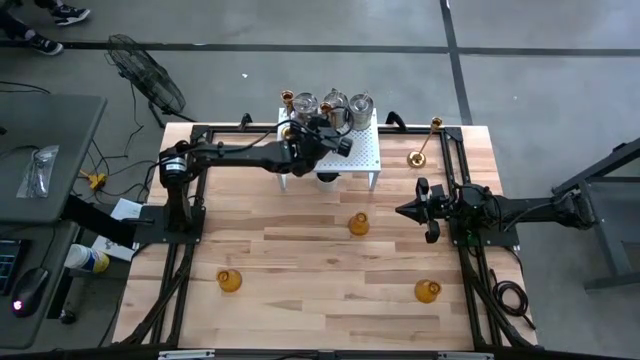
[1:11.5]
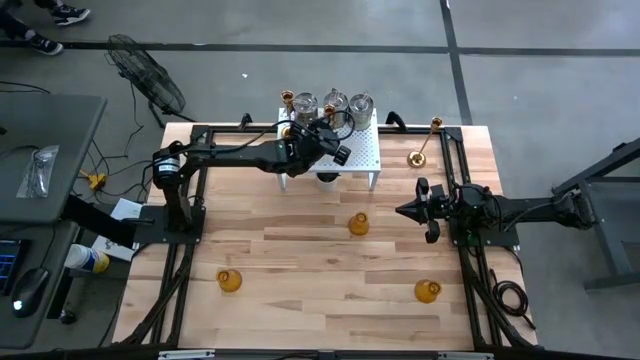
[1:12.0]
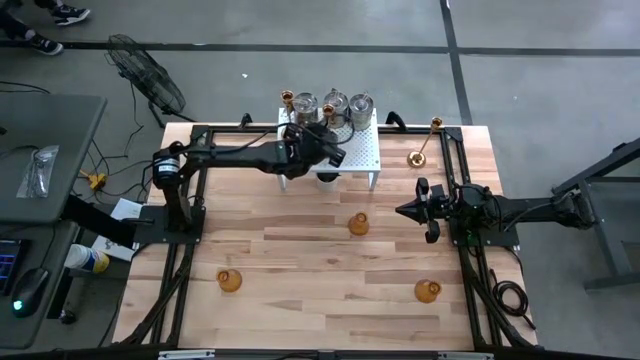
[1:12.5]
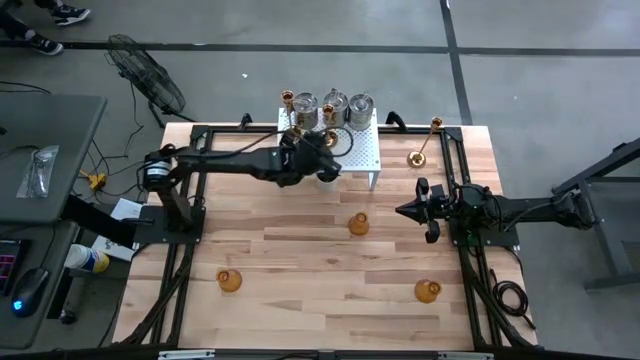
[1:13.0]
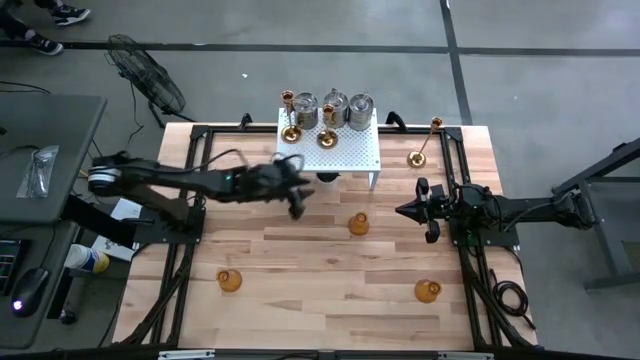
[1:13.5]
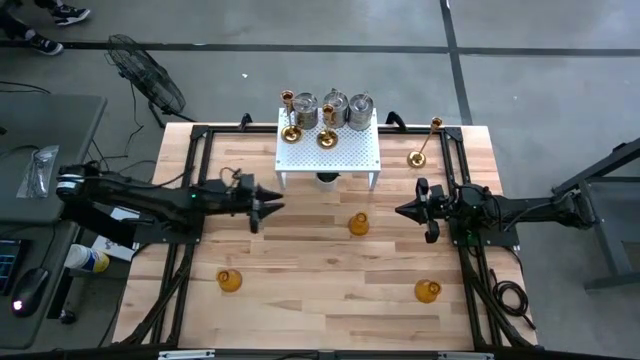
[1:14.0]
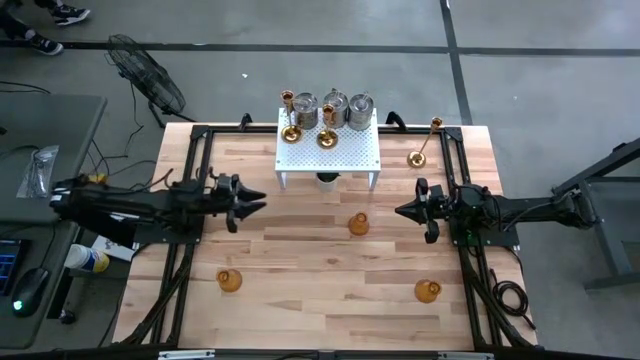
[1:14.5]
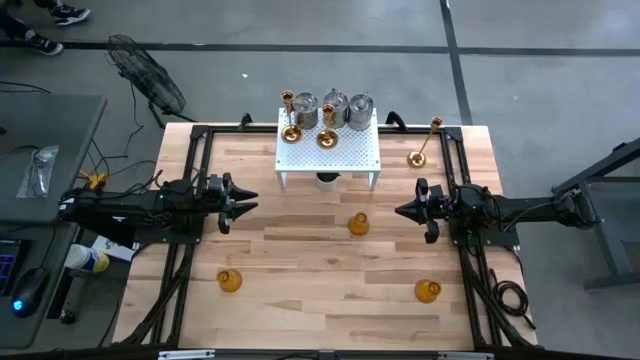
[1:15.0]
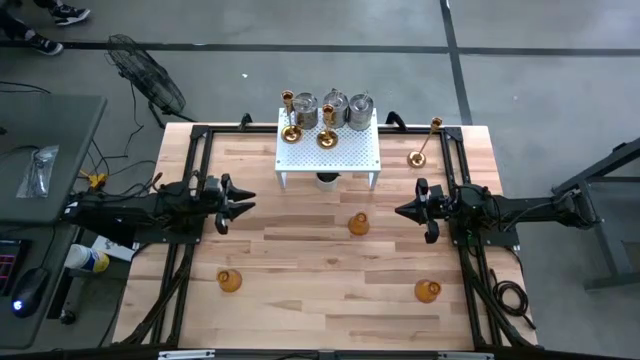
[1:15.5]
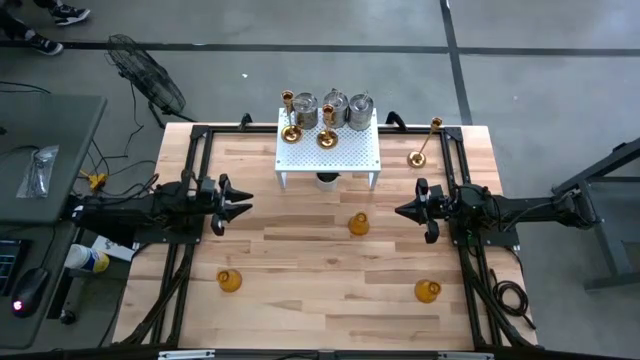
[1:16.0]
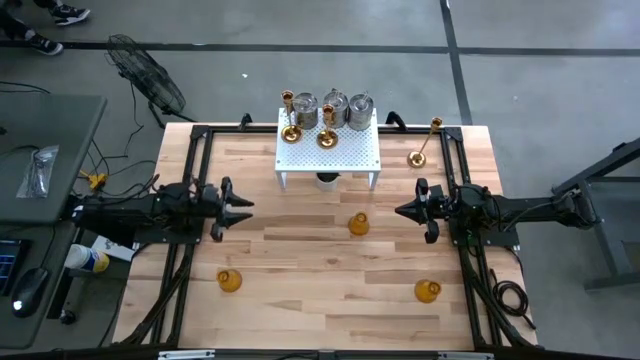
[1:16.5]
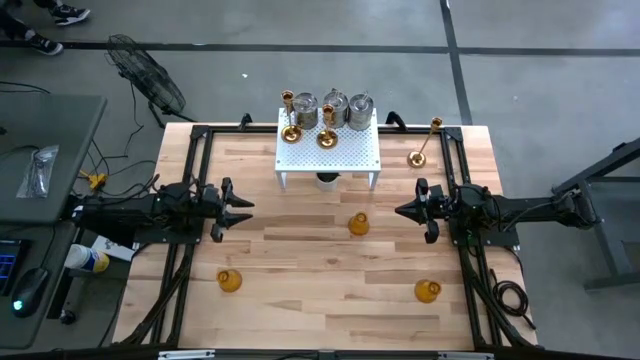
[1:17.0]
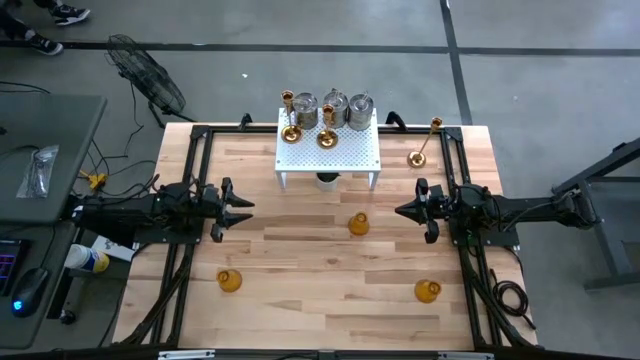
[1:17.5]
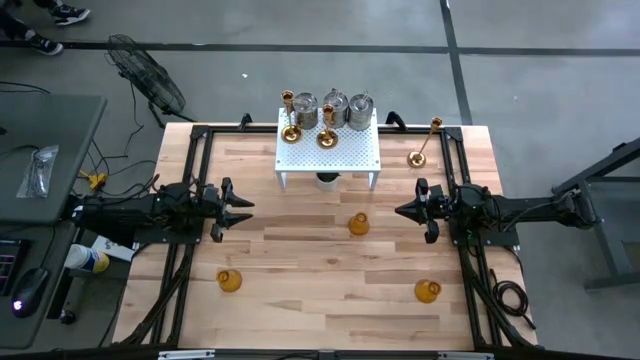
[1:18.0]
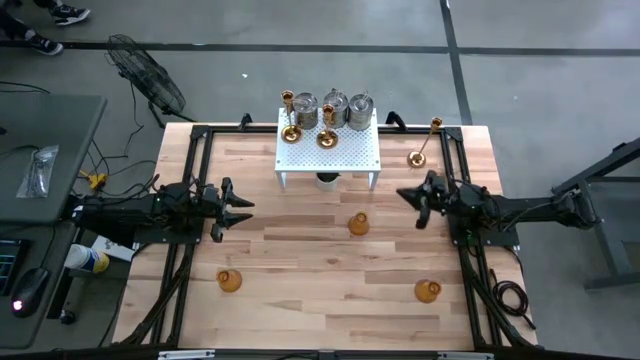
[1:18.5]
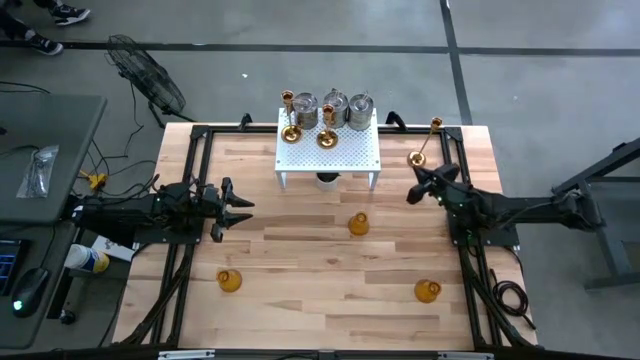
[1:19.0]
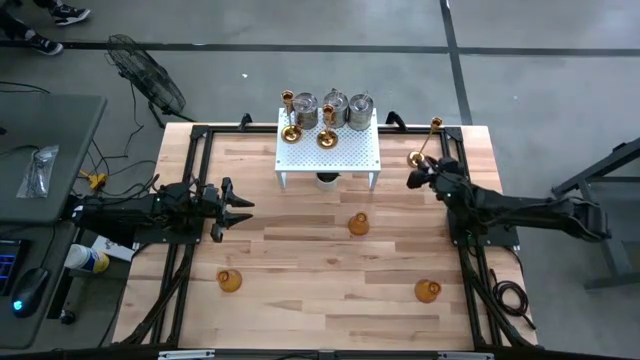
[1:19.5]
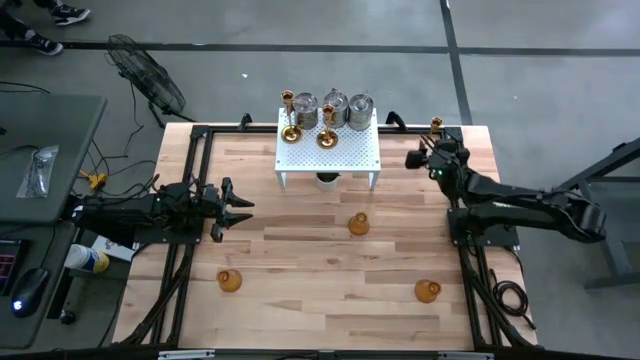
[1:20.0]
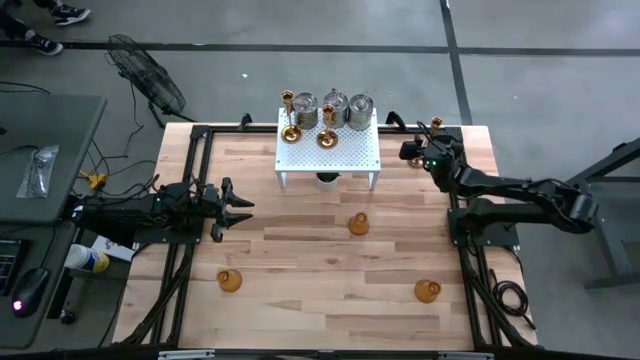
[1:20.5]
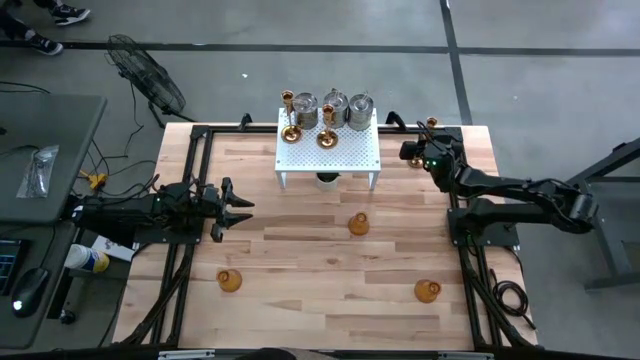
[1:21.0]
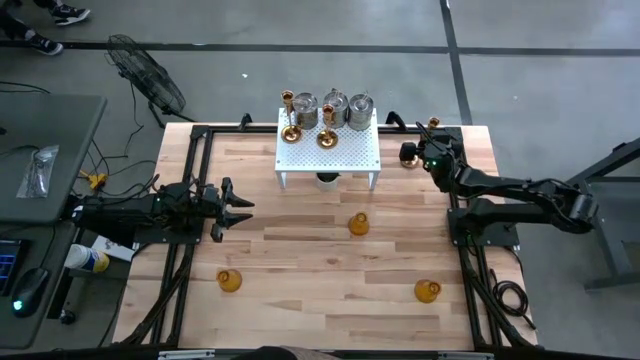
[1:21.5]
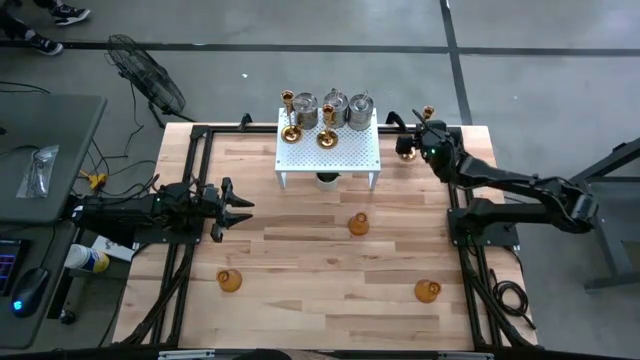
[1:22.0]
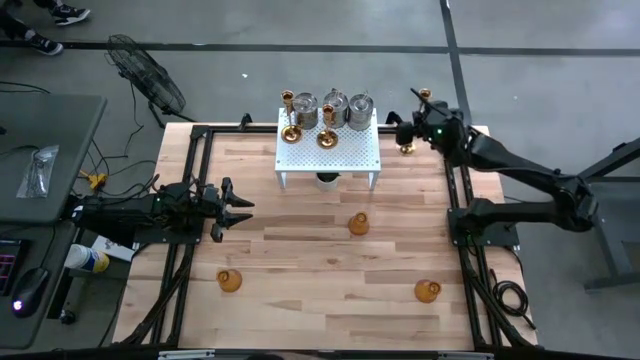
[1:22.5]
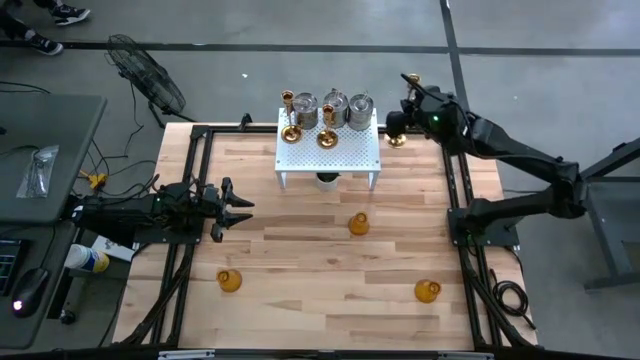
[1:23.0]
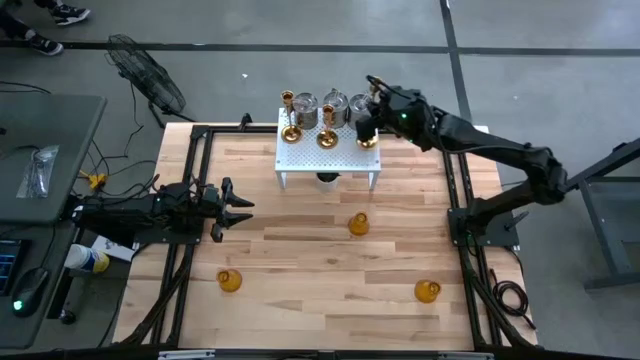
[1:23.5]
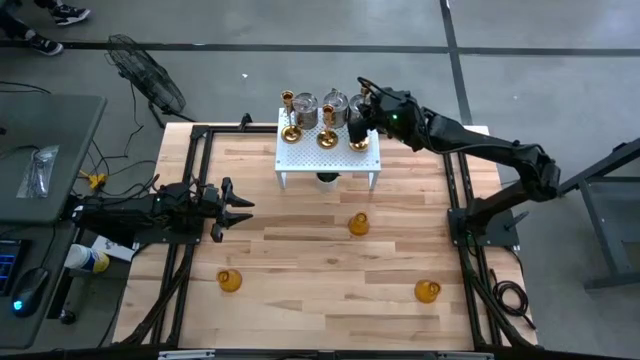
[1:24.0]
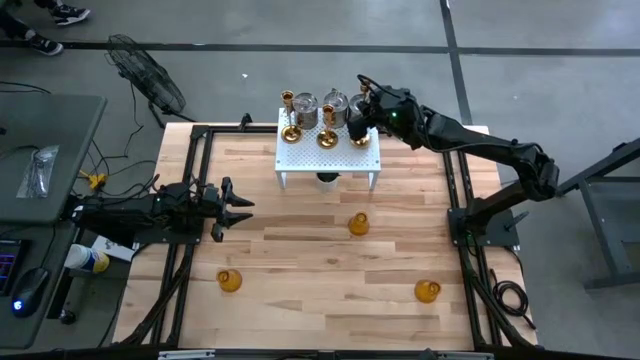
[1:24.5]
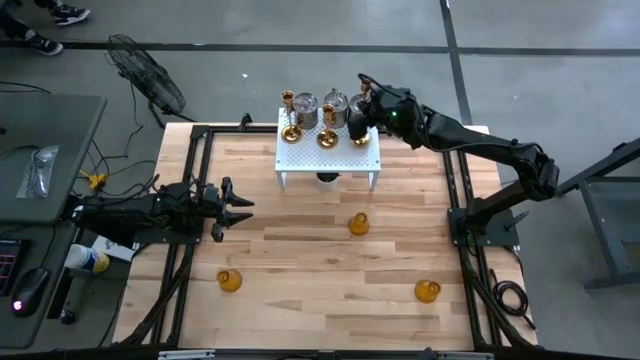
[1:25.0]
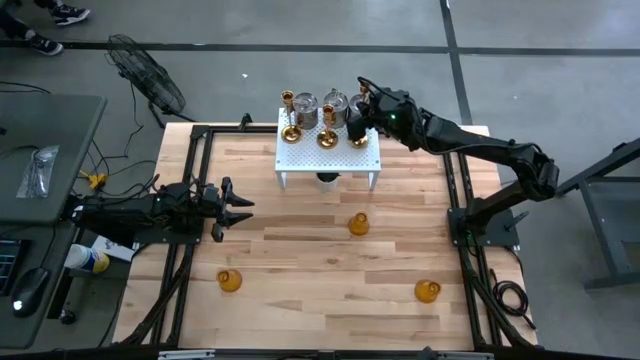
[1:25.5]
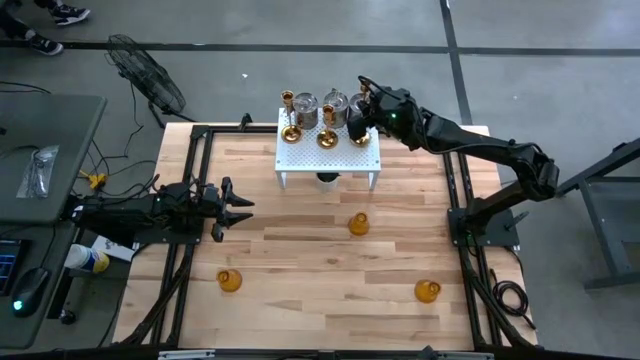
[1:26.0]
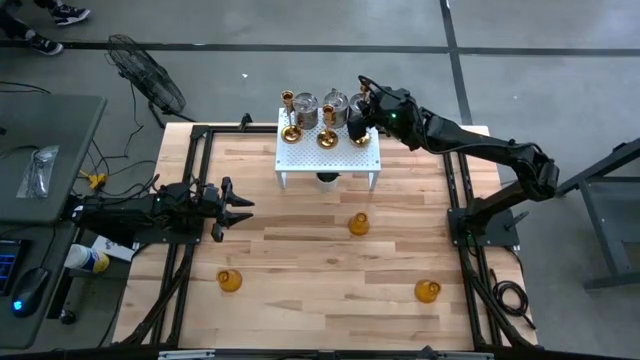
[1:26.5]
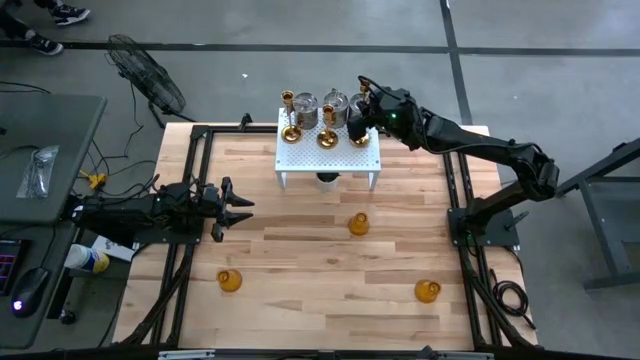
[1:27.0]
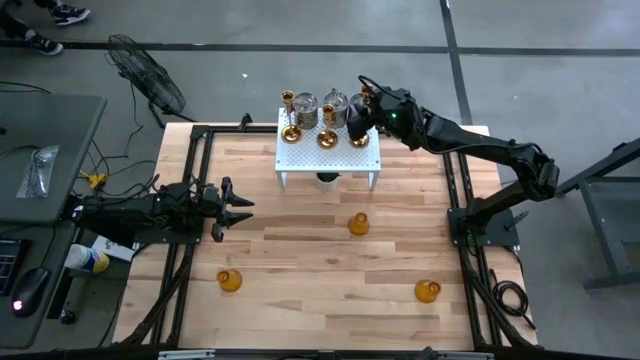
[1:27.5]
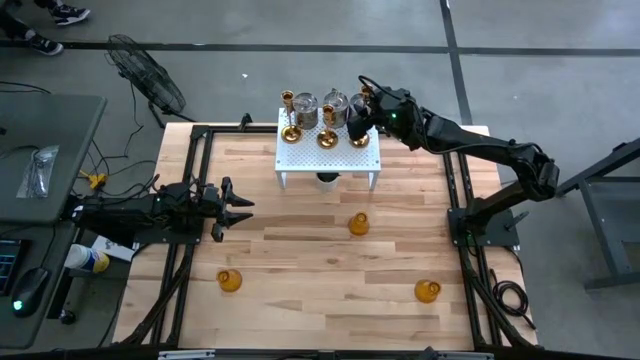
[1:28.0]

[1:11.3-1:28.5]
Task: Pick & Place candle stick holders
Put the gold candlestick holder on the shelf
